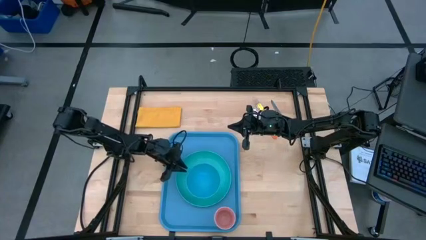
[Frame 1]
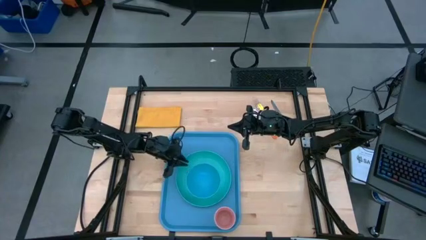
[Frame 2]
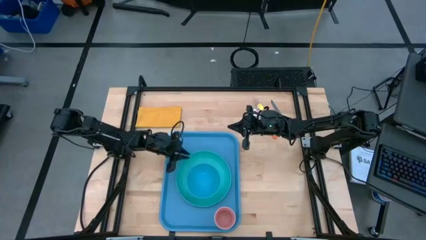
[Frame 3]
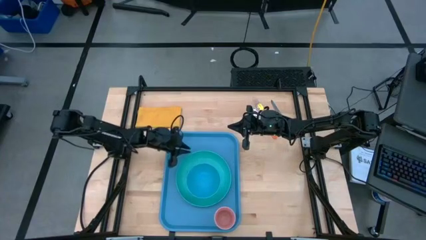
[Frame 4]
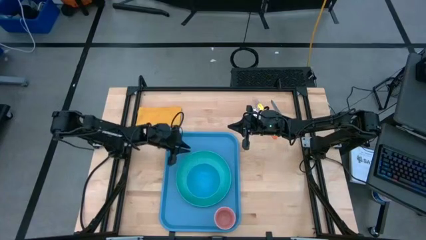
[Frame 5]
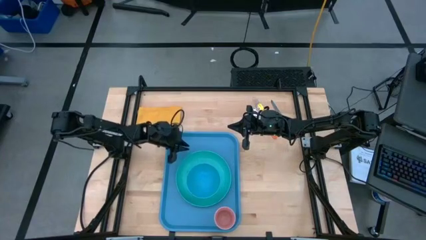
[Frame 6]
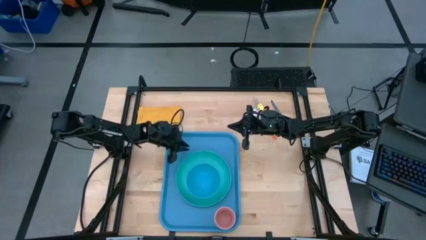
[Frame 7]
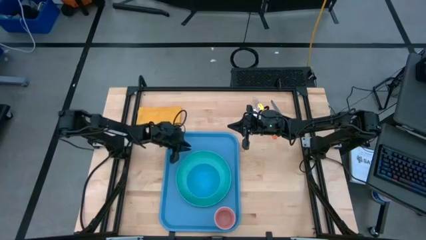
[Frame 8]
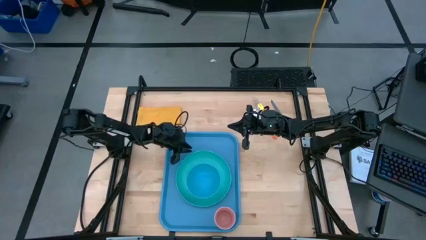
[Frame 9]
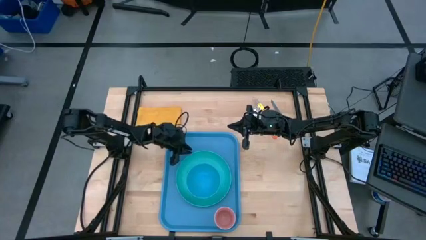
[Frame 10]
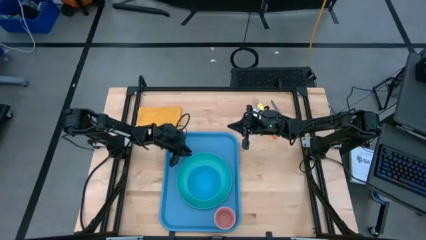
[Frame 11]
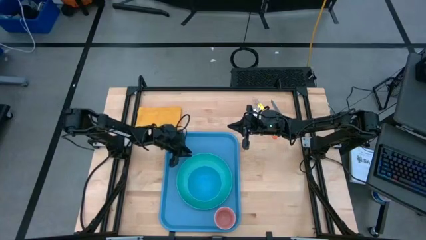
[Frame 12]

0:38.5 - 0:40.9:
Task: Set up tray
Adjust the light blue plate on the blue tray

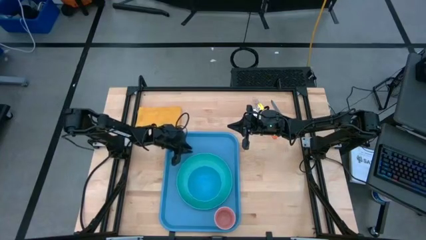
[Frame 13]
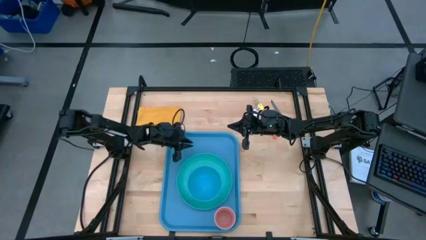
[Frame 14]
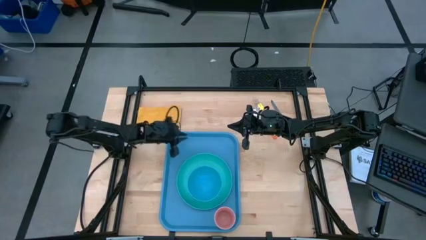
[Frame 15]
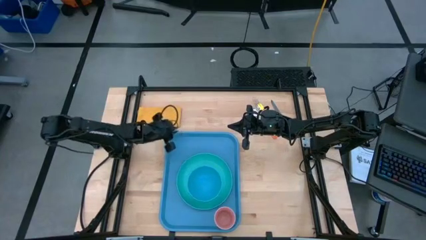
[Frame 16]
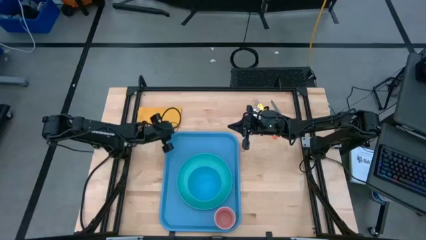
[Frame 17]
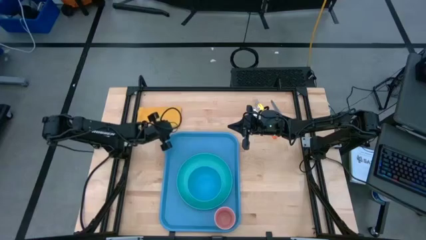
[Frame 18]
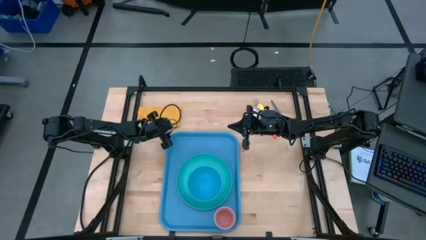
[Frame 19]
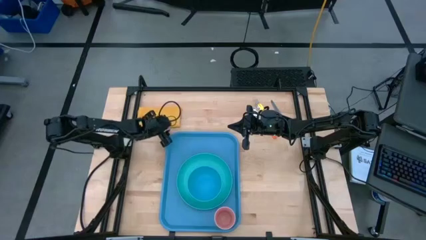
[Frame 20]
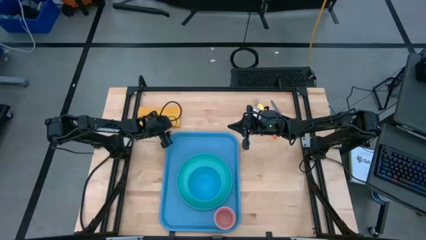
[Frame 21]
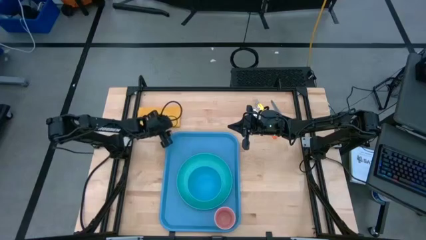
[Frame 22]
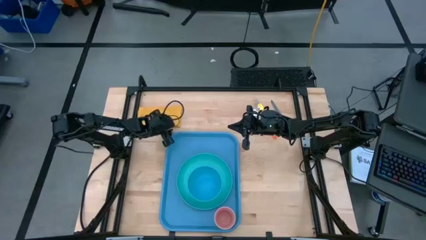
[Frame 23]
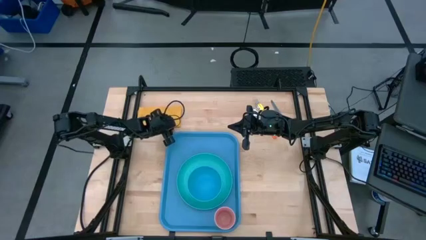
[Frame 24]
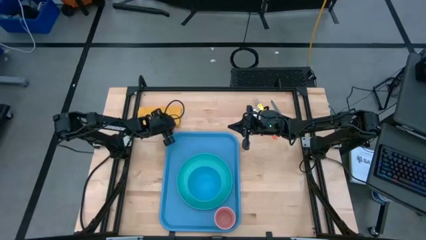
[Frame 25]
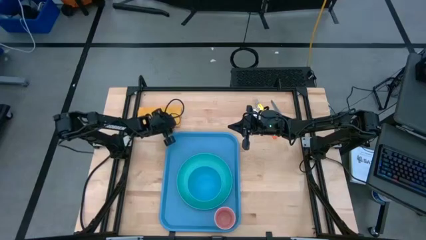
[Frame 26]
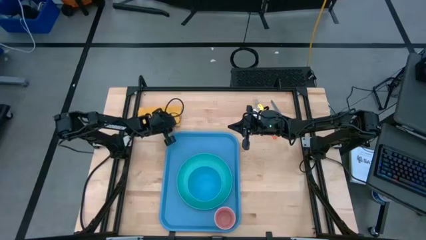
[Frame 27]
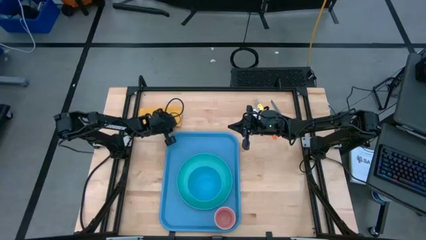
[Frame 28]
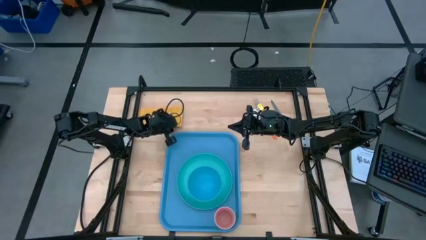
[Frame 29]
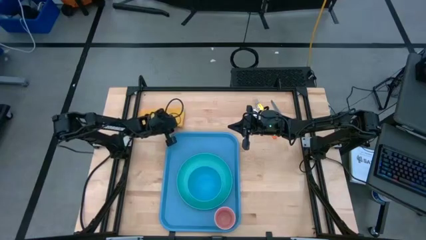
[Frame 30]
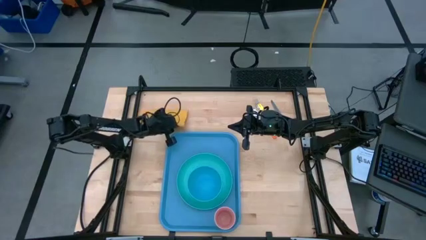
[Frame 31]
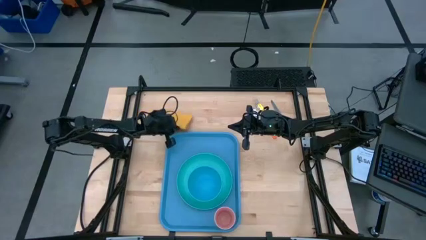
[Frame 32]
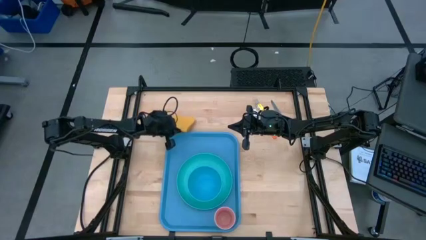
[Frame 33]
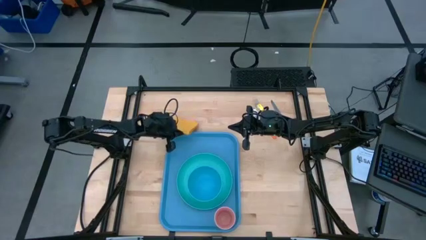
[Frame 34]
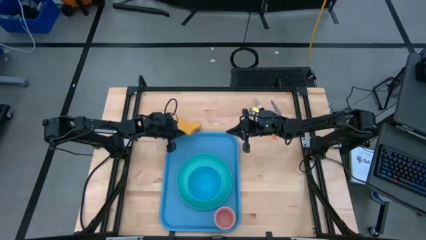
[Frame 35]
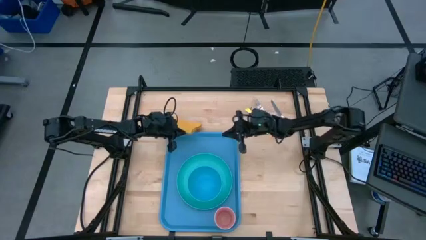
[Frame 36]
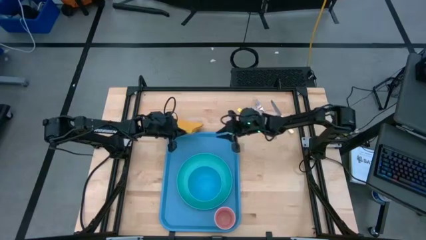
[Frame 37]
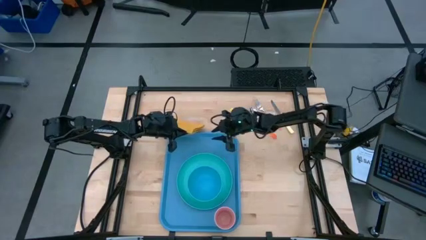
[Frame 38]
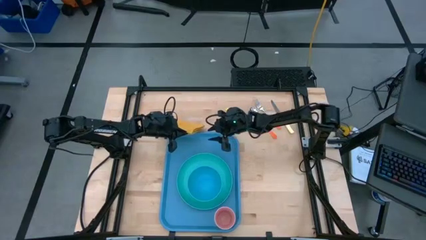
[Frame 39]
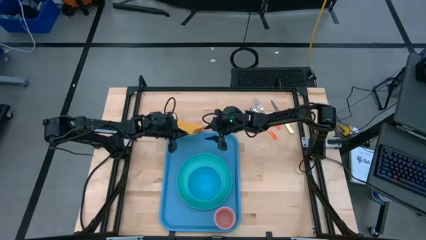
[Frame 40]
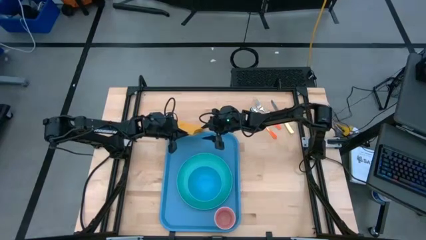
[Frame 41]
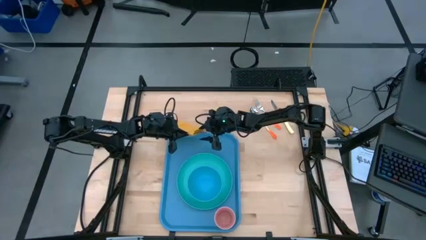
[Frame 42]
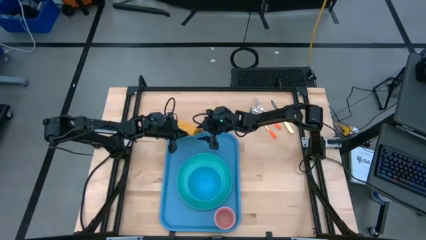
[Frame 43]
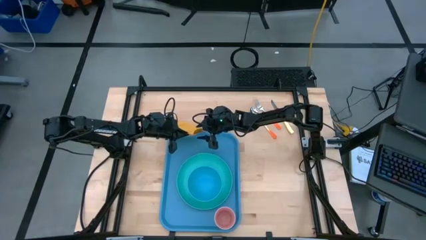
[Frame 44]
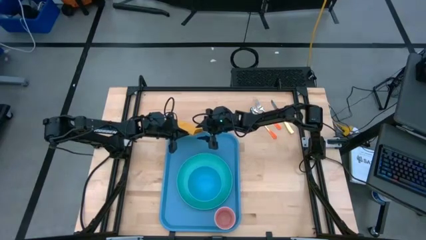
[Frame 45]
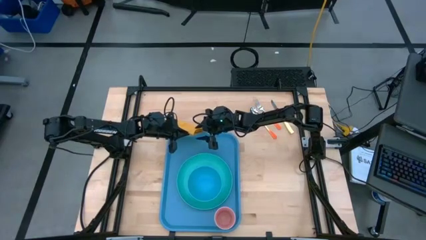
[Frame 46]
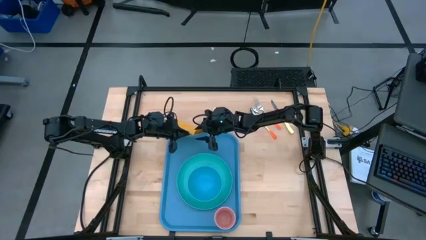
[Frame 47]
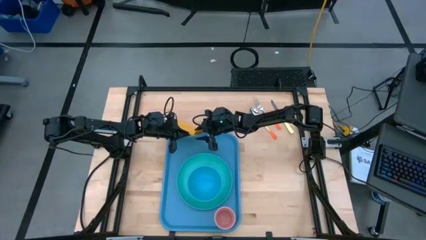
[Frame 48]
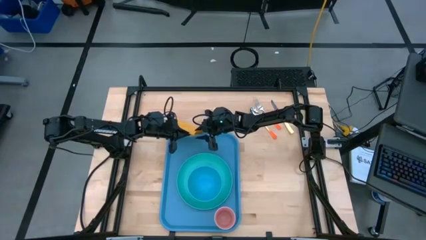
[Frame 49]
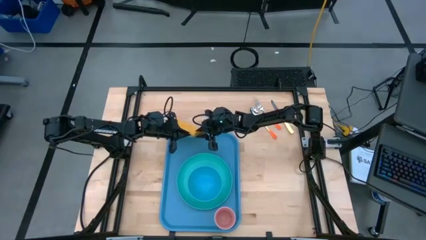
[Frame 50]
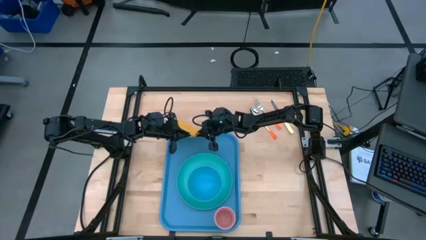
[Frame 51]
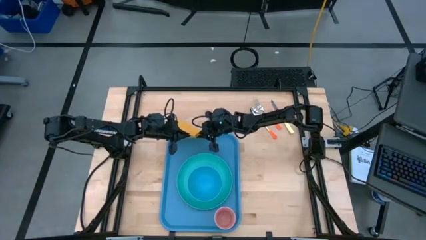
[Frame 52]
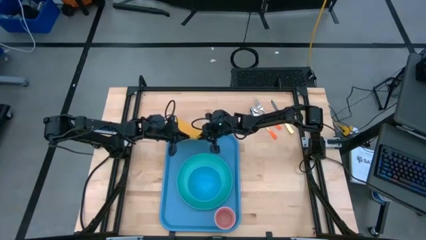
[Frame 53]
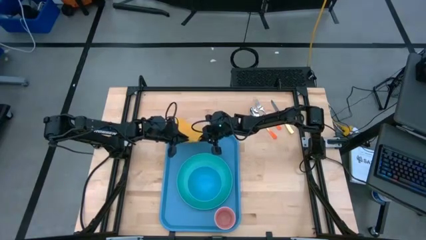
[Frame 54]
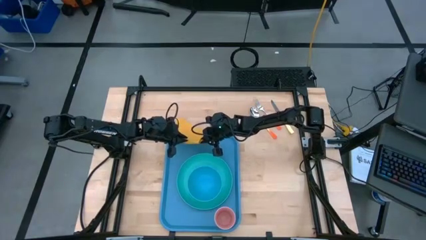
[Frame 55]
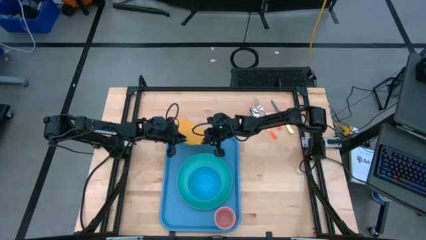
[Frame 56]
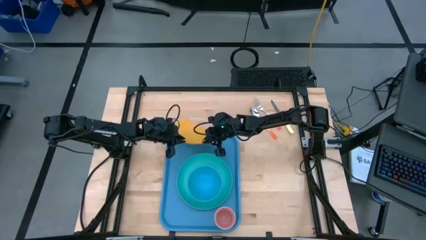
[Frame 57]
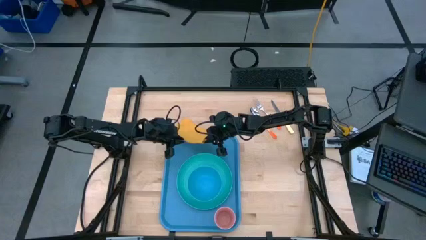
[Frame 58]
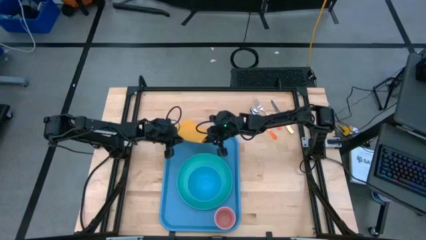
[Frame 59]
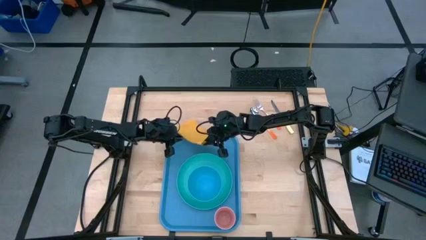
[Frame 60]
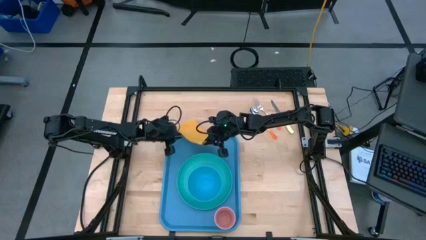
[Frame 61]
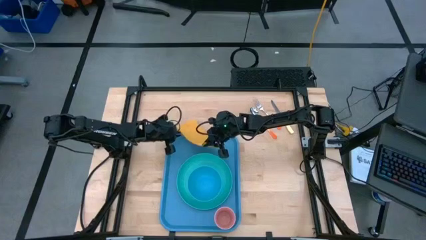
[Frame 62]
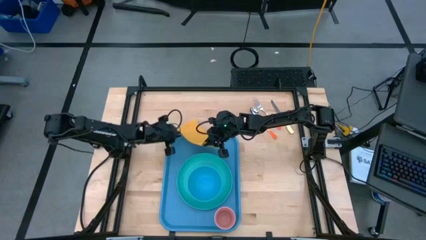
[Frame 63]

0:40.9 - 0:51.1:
Put the orange napkin on the blue tray to the top of the light blue plate

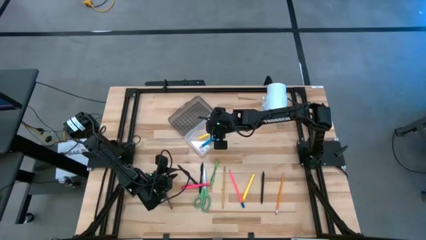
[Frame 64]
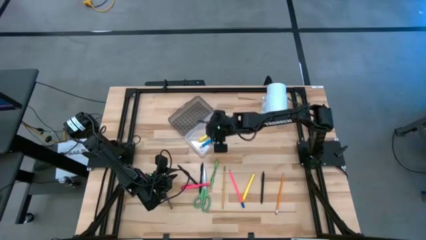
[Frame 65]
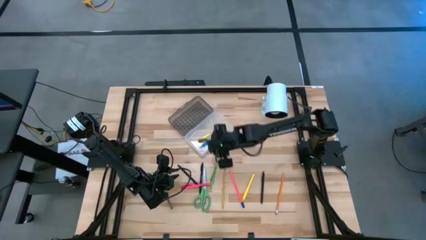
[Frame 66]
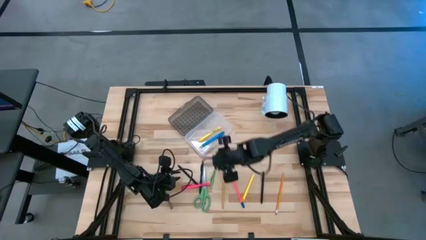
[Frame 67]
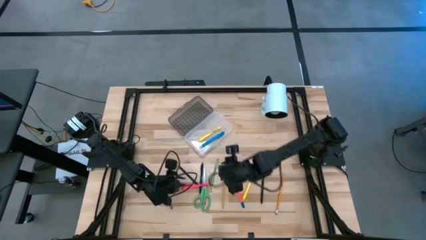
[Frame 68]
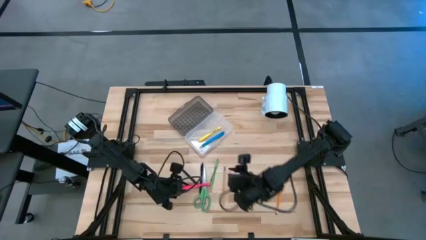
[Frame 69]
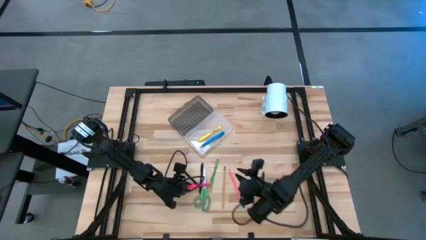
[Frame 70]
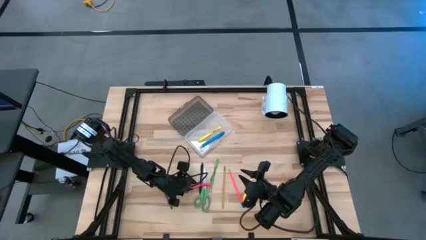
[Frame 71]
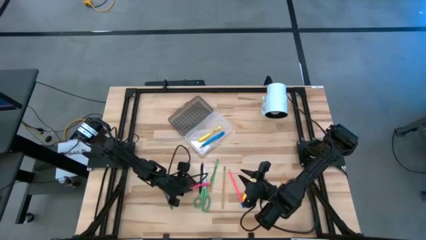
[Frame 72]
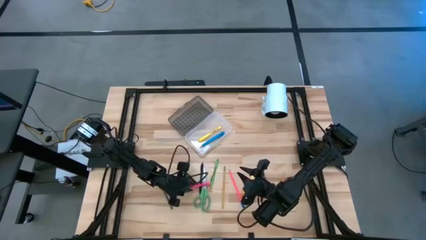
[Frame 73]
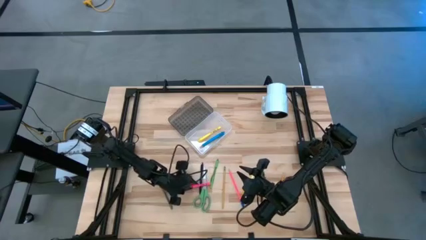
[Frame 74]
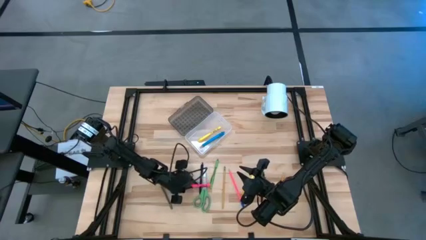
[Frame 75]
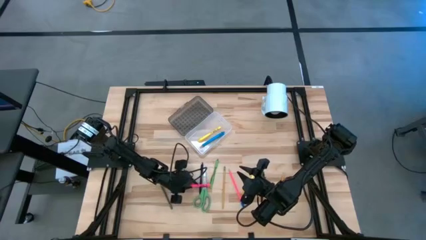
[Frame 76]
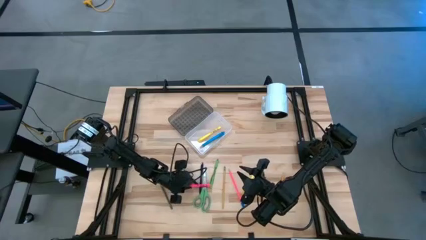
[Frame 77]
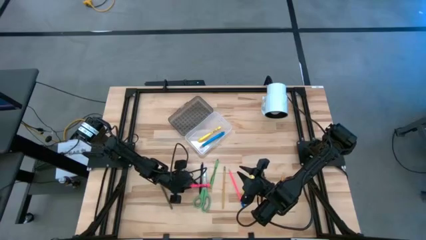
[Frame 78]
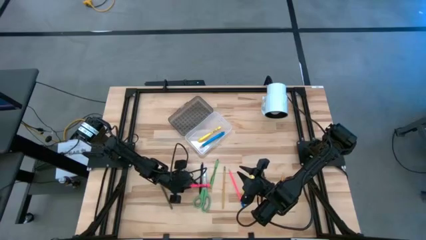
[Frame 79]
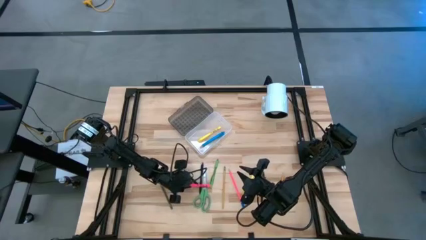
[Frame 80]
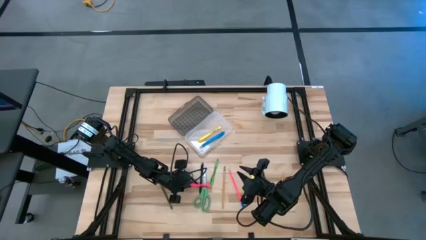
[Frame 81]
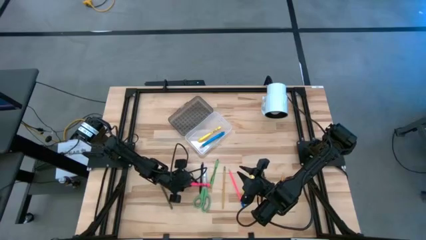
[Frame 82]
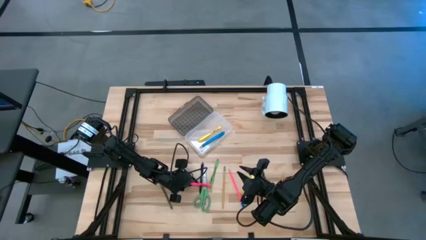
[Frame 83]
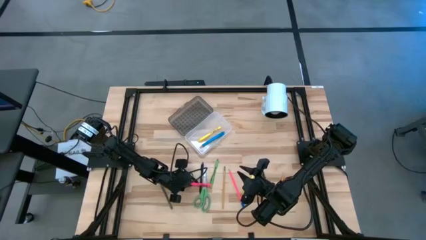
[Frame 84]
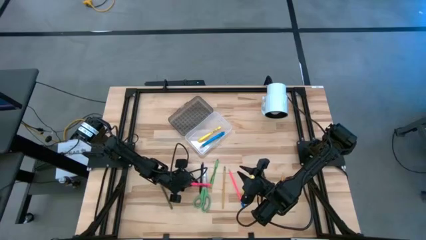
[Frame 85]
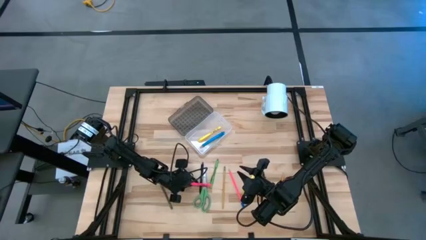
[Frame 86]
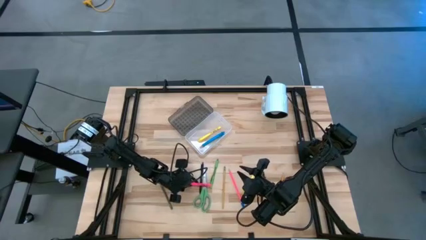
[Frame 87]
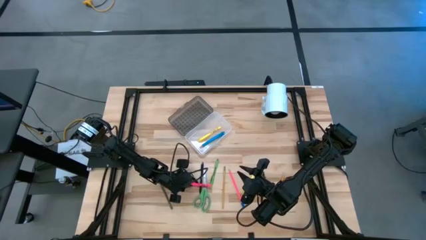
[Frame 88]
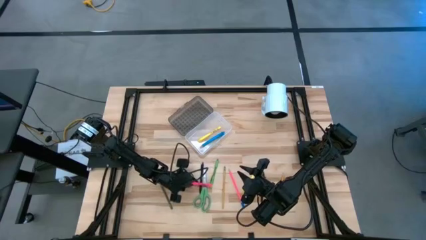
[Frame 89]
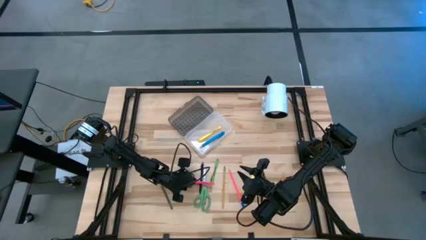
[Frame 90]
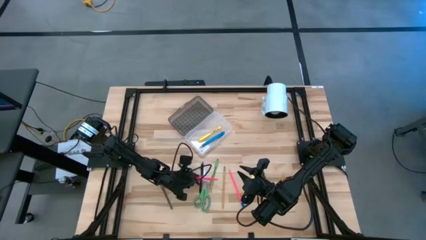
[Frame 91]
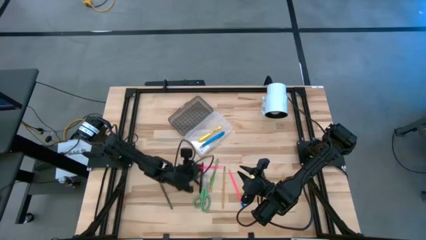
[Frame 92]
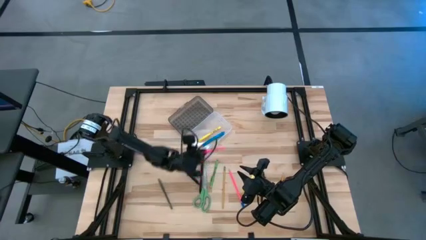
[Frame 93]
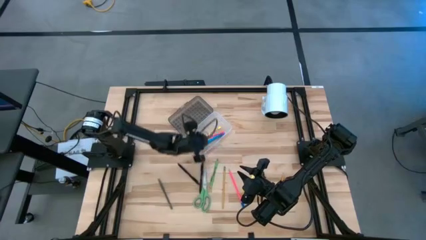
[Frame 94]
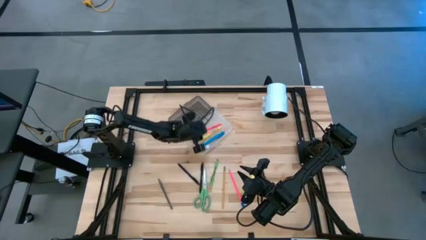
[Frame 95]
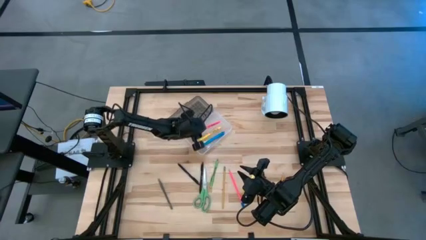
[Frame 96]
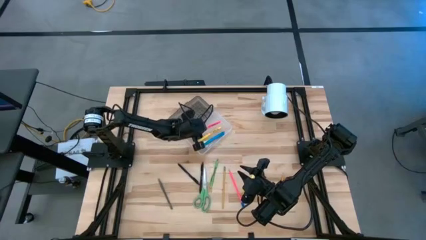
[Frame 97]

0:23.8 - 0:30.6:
Task: Pick & place school supplies into a supply box
Put the pink pen into the transparent supply box
